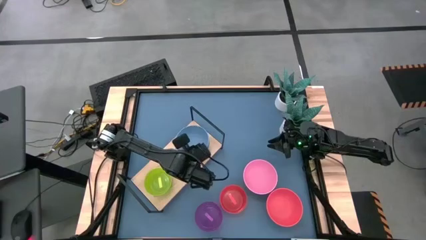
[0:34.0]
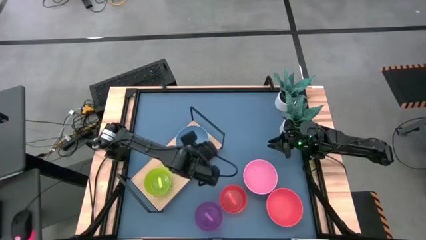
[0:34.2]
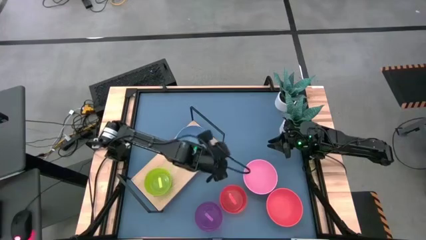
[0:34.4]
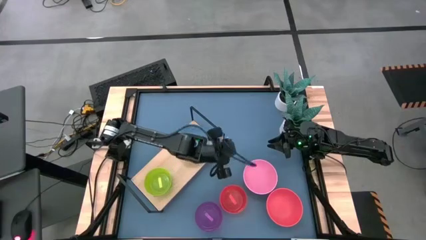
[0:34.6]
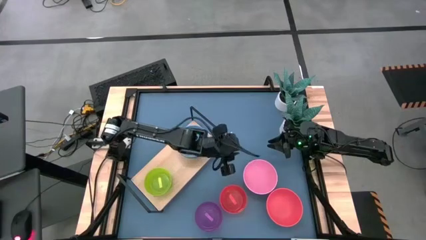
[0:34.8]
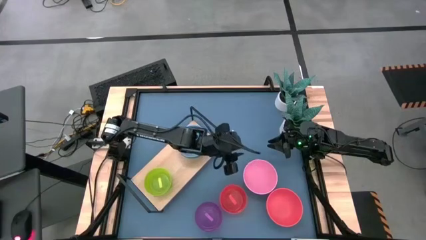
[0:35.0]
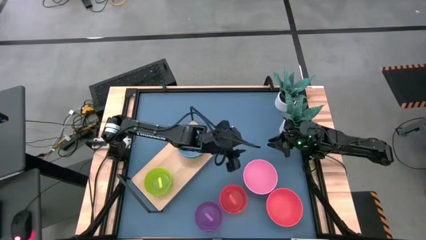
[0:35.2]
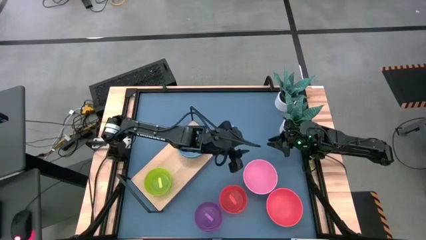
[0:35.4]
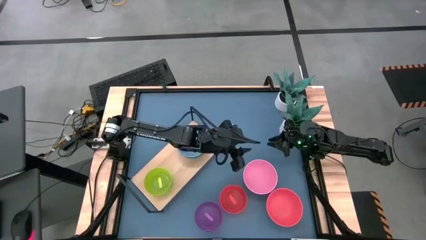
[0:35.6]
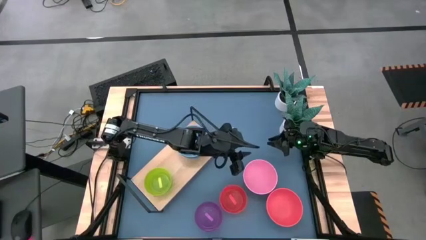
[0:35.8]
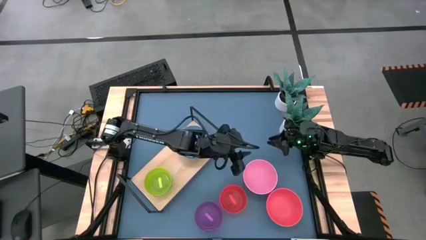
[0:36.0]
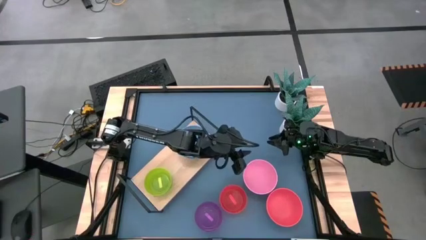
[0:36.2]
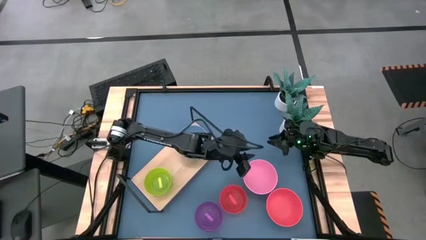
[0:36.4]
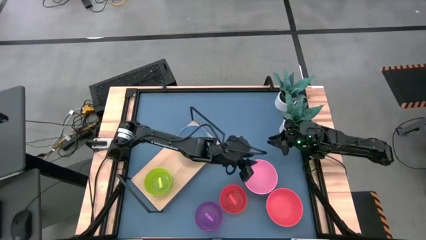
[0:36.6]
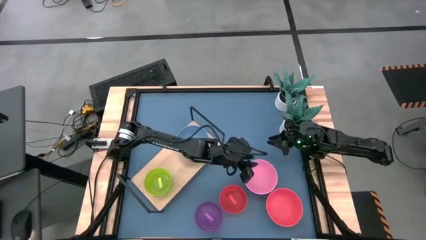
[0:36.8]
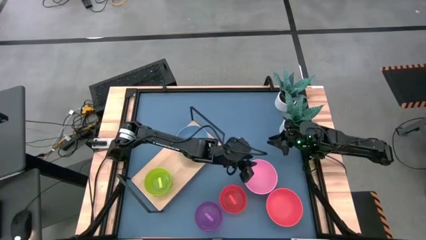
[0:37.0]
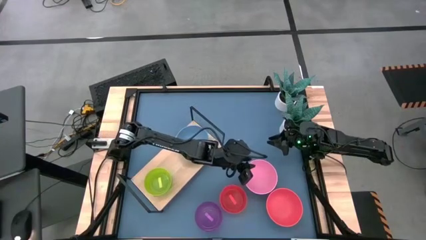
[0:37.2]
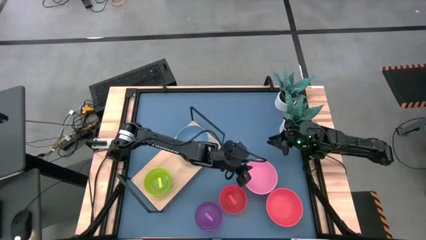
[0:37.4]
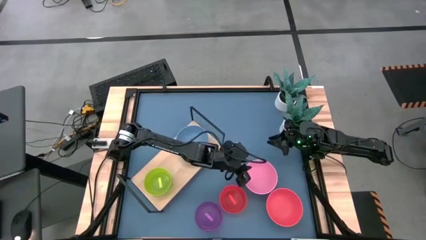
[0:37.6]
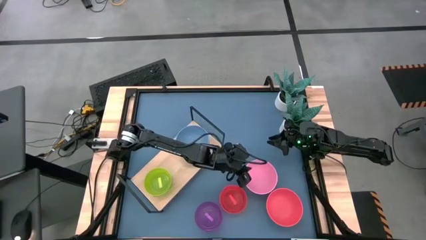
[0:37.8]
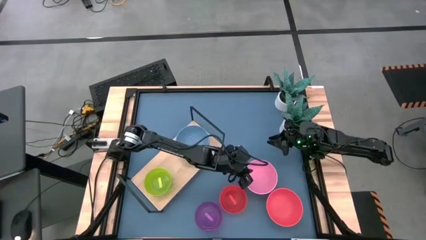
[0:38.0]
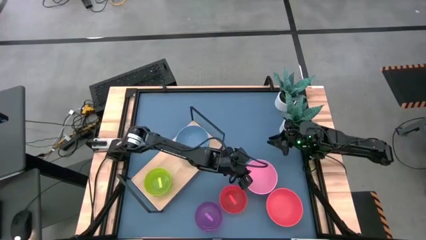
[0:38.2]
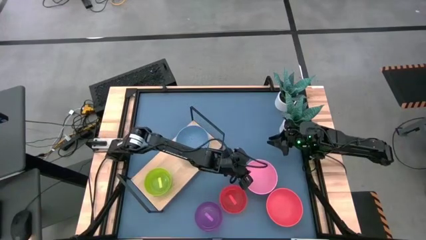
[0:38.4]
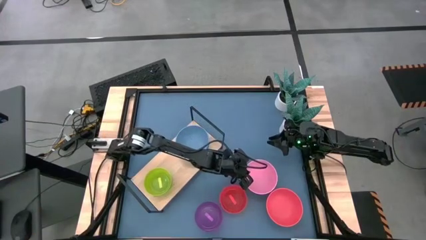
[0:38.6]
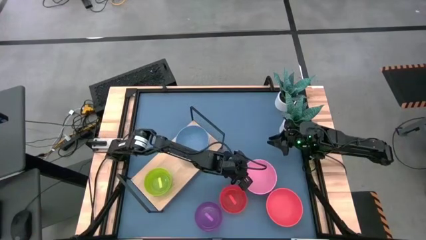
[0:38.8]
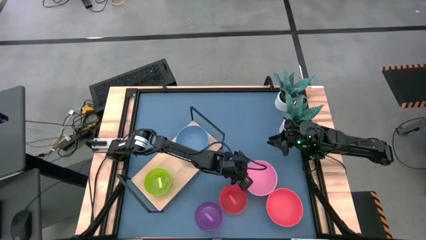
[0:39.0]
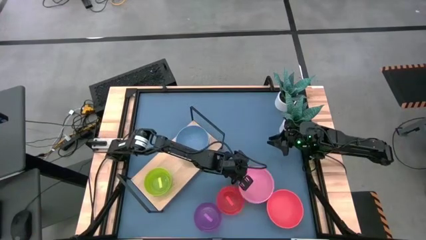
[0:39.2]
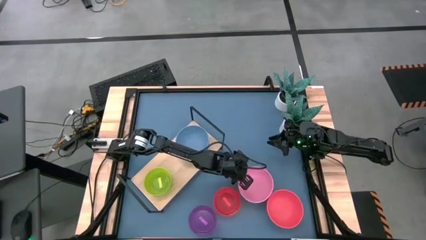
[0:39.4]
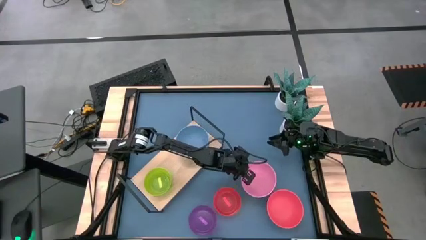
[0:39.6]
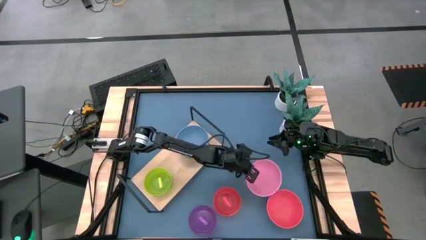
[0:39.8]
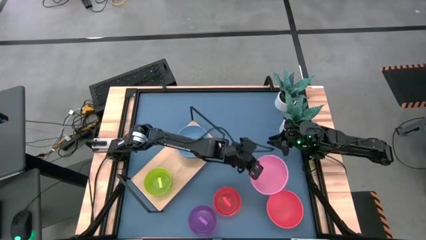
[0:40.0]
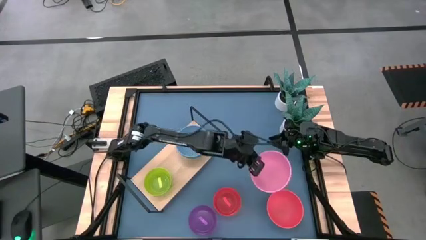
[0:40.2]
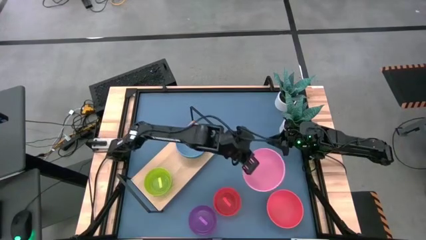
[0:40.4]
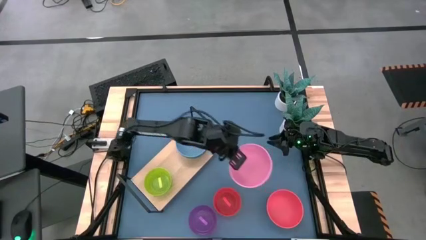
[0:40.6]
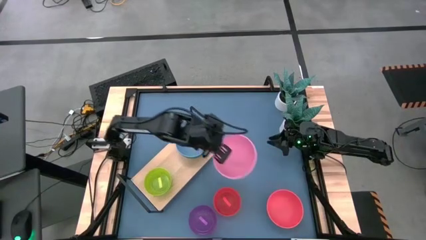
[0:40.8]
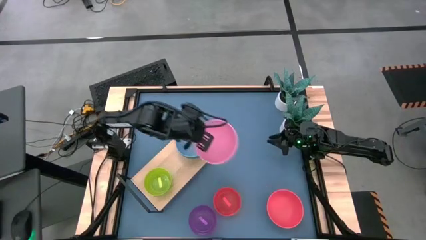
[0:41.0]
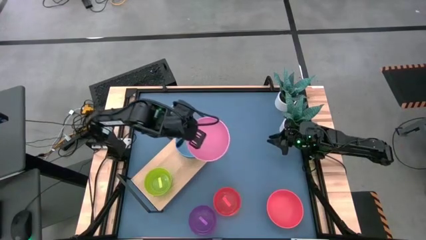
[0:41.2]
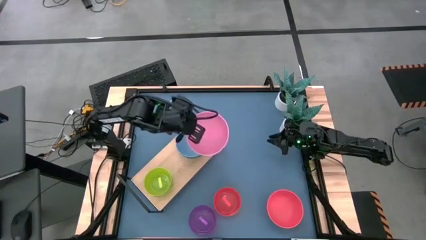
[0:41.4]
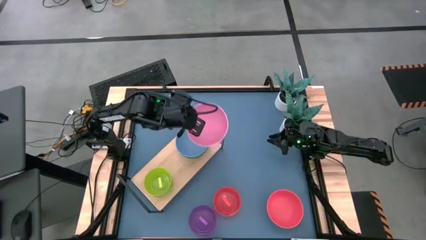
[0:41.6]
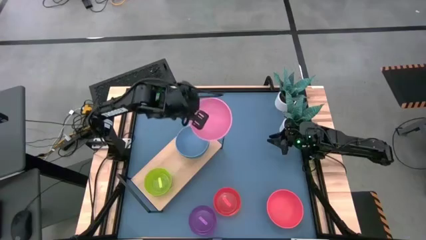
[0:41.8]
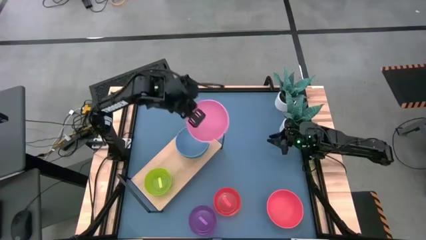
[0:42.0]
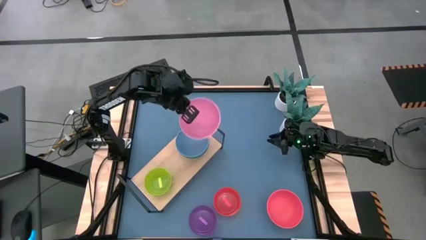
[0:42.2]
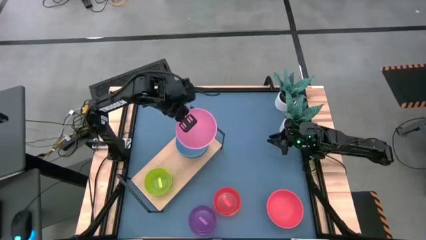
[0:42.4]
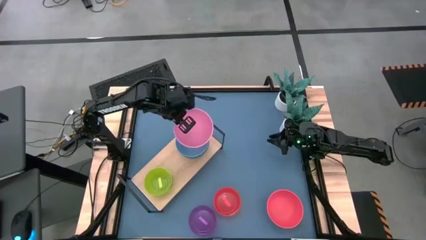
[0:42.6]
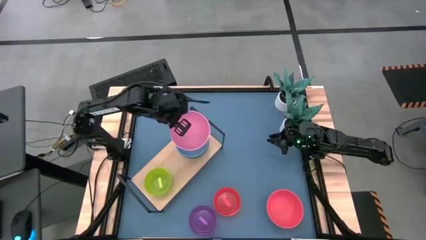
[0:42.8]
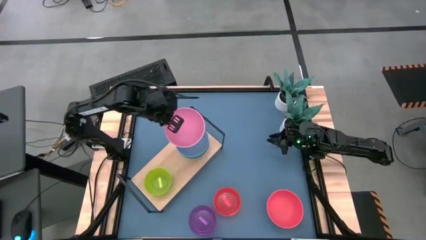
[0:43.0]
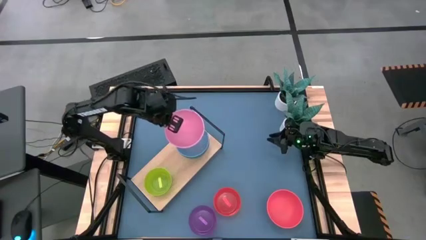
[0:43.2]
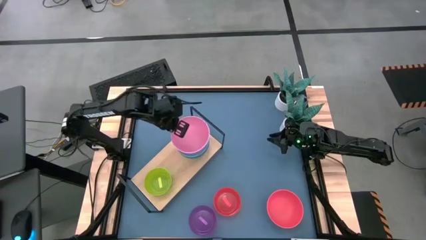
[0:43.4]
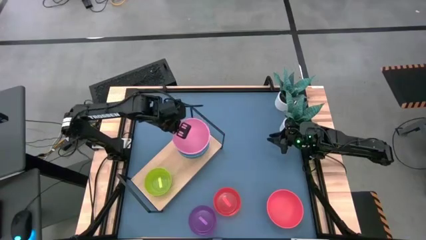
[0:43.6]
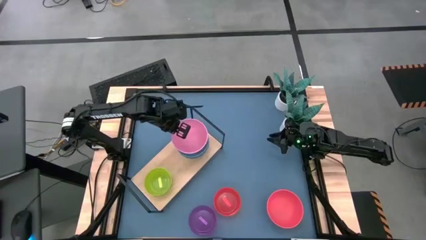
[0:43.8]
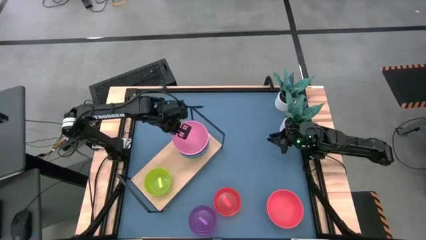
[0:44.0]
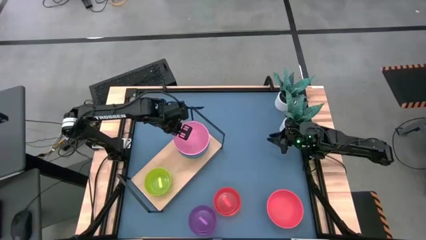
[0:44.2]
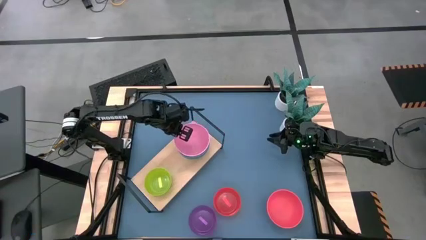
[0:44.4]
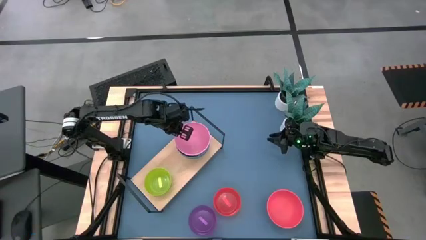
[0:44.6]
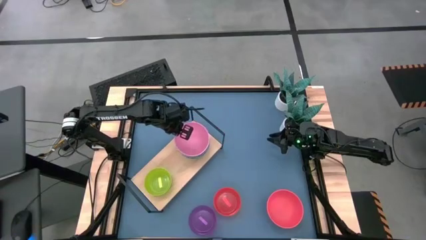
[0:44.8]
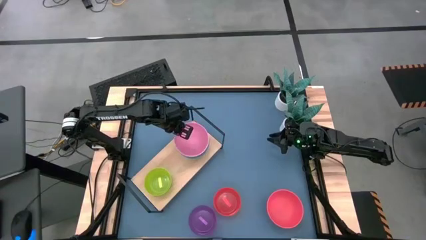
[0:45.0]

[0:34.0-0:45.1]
Task: Place and stack bowls onto a shelf
Stack the pink bowl on top of the blue bowl on the shelf

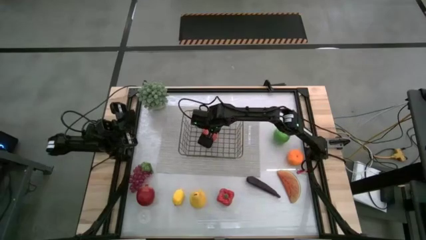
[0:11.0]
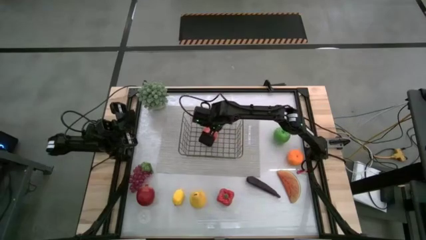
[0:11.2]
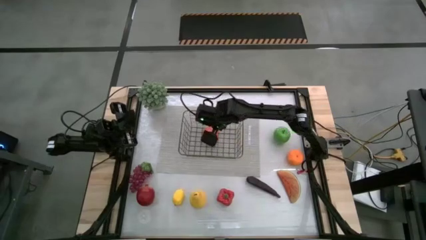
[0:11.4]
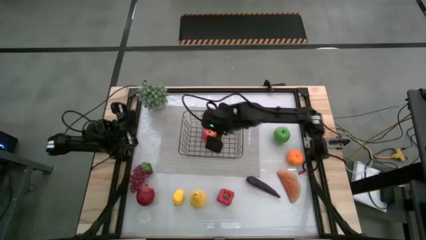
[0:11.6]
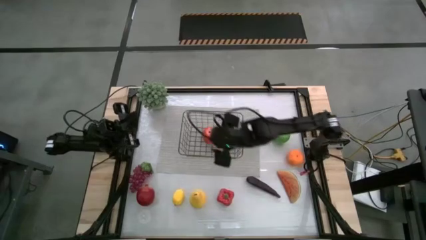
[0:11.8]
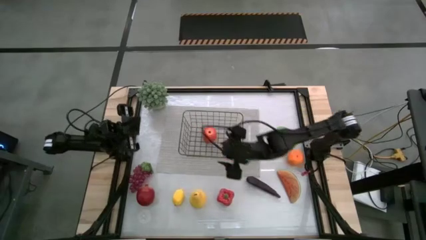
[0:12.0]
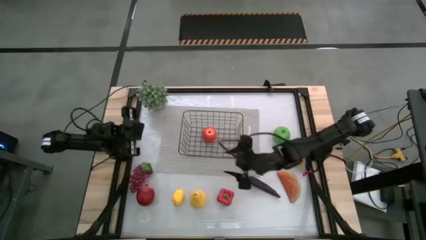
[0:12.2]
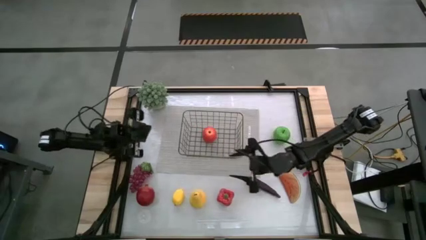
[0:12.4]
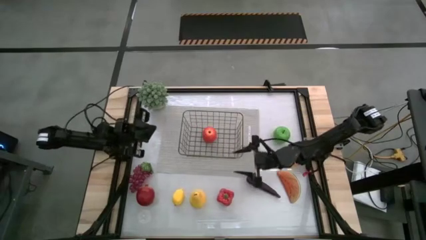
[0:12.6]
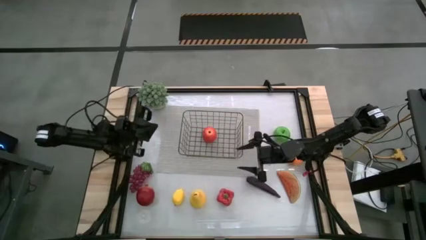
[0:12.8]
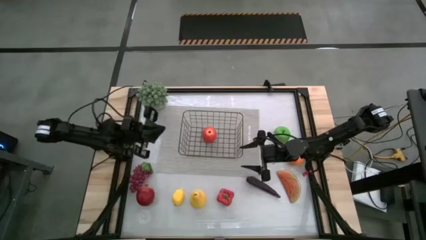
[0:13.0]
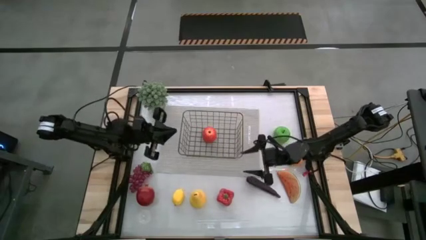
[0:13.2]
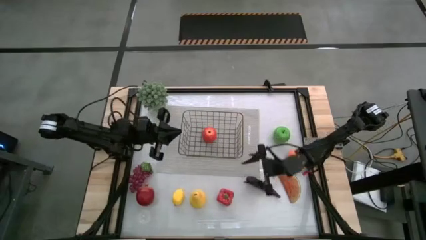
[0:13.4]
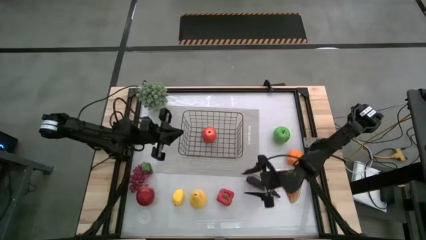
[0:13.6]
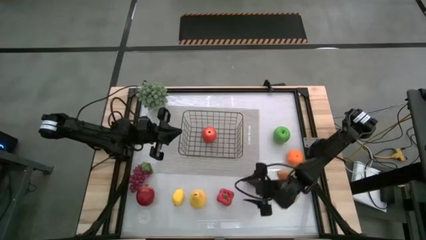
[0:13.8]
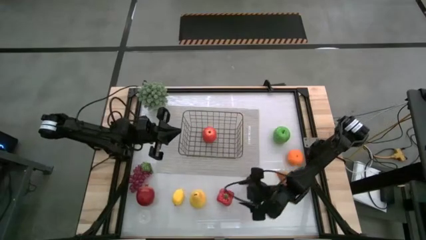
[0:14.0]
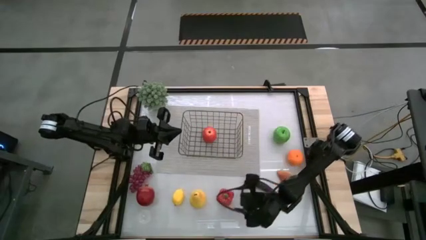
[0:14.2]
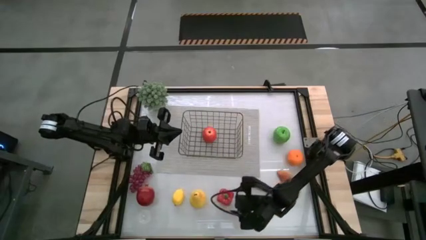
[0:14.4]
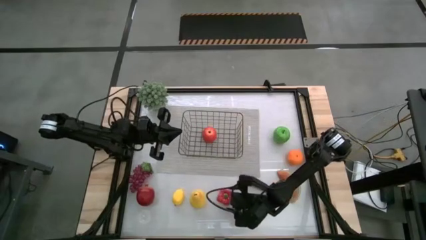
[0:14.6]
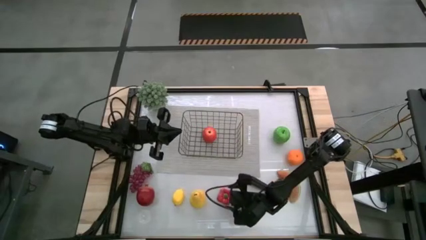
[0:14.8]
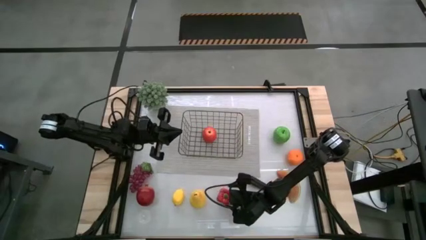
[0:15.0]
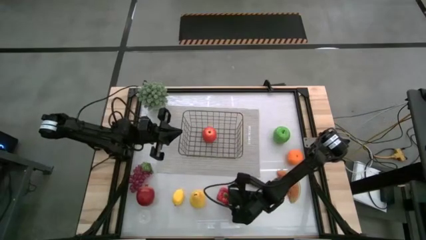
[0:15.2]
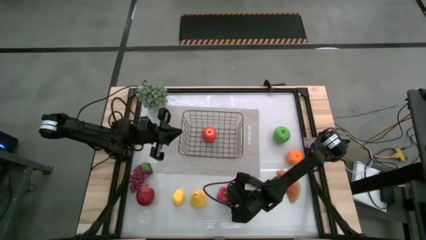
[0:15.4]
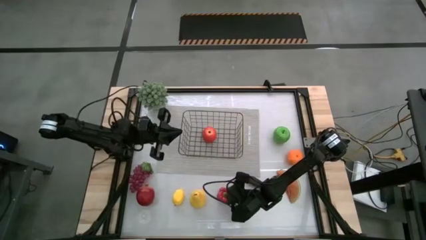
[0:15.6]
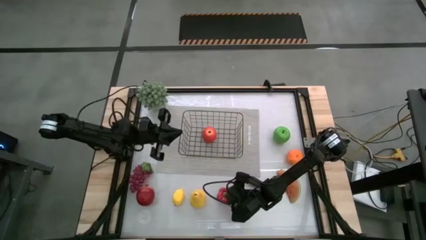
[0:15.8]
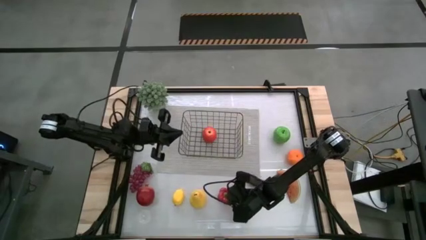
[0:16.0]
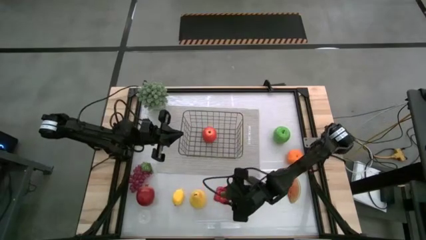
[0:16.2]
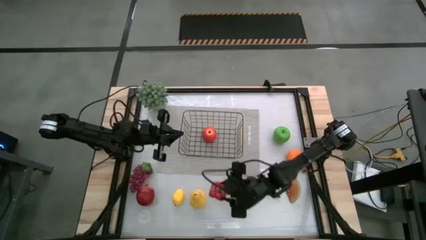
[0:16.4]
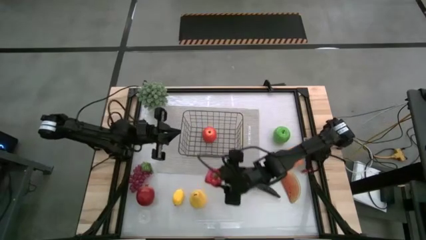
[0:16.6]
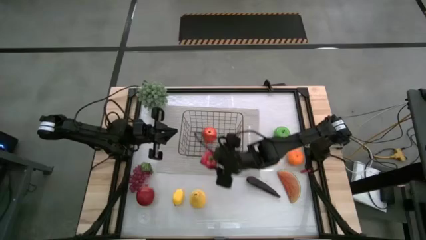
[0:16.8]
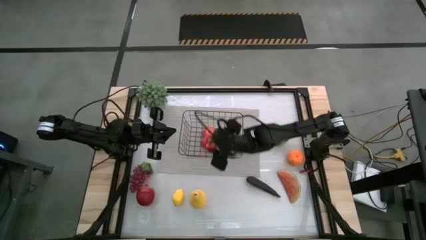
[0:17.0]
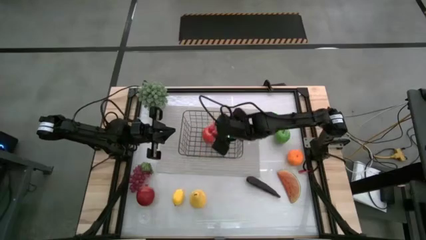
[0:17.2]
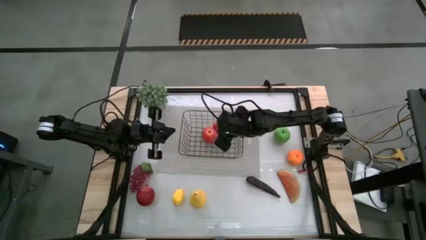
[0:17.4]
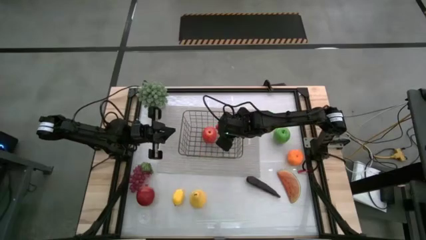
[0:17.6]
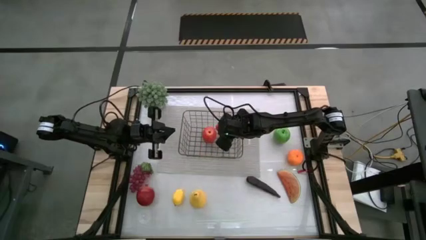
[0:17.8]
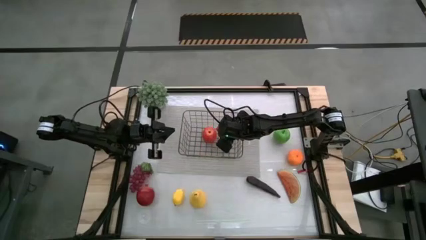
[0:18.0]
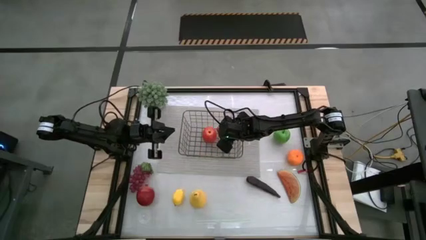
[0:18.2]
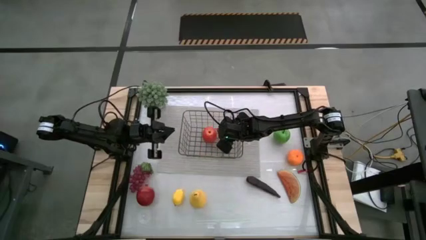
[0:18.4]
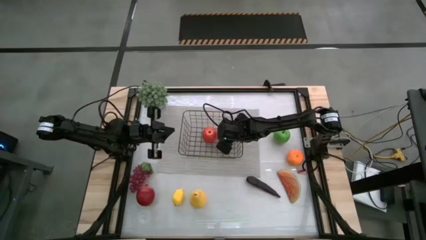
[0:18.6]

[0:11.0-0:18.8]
Task: Build produce basket
Put the bell pepper into the wire basket
